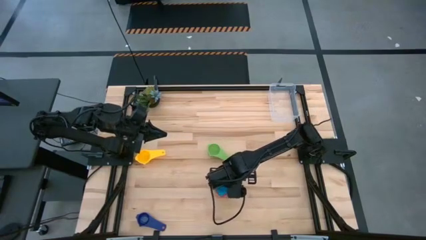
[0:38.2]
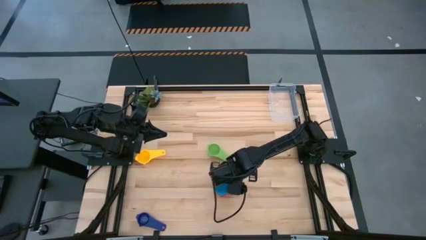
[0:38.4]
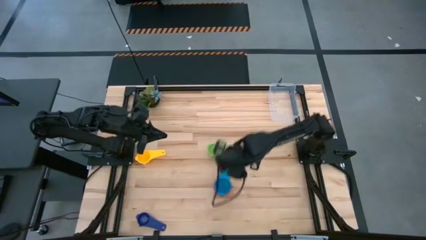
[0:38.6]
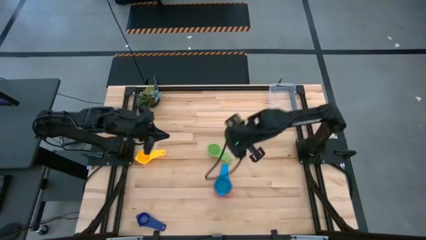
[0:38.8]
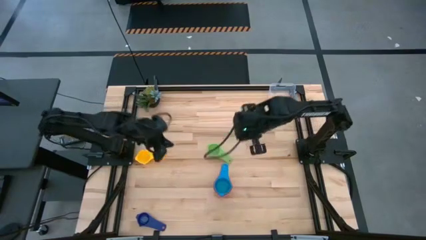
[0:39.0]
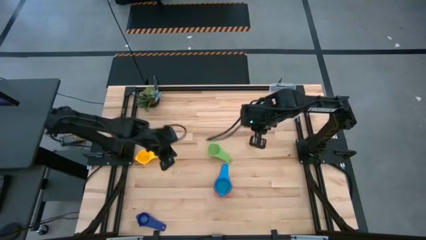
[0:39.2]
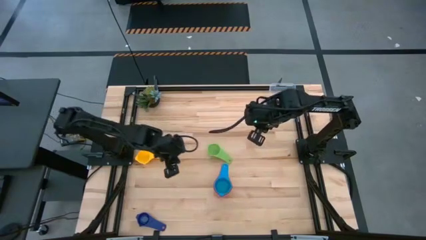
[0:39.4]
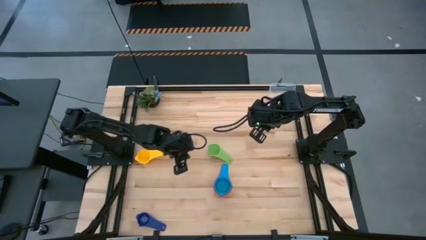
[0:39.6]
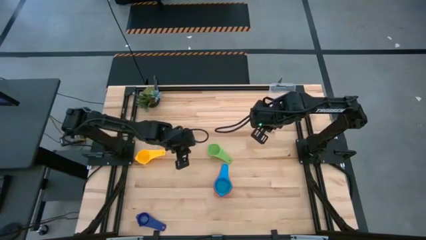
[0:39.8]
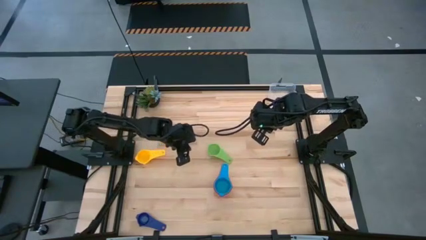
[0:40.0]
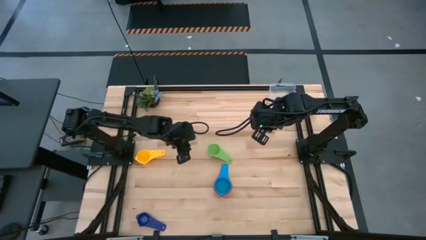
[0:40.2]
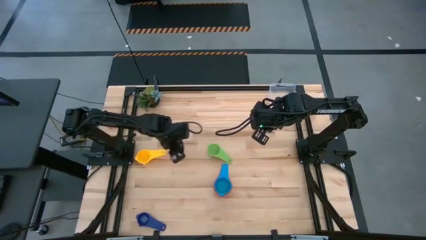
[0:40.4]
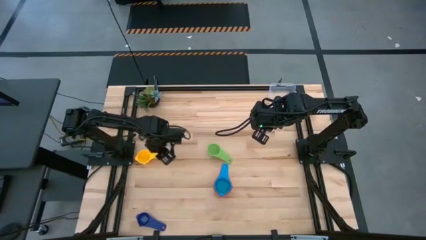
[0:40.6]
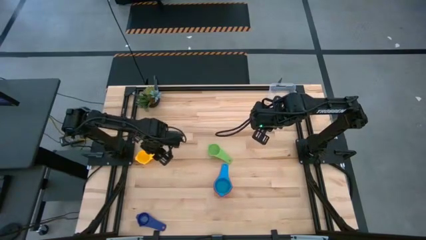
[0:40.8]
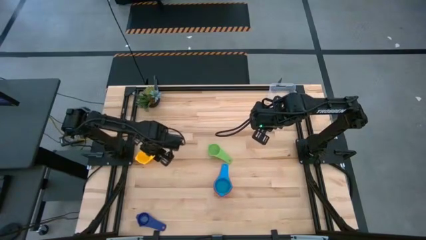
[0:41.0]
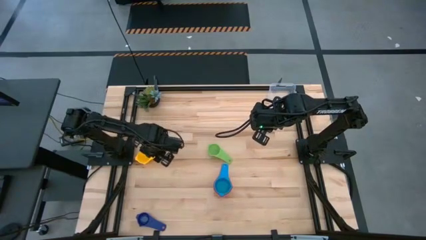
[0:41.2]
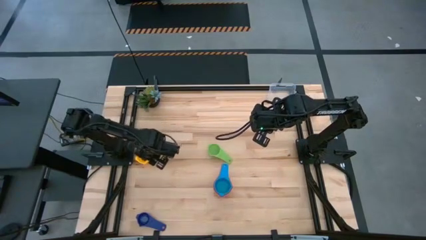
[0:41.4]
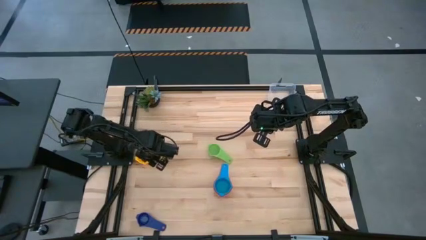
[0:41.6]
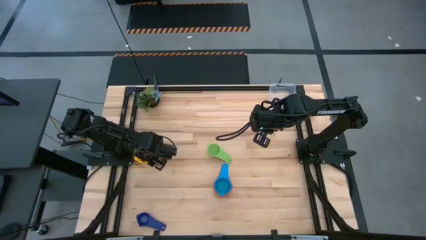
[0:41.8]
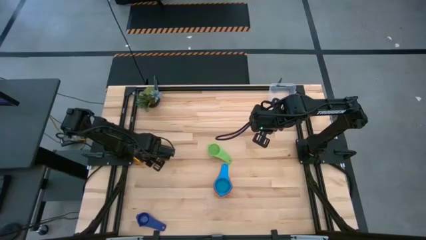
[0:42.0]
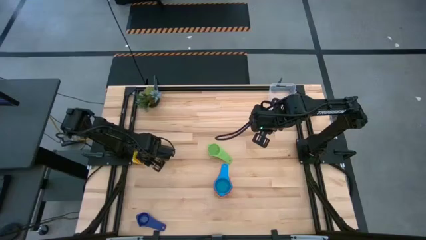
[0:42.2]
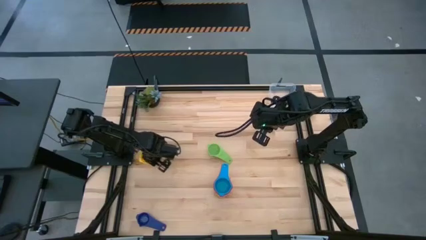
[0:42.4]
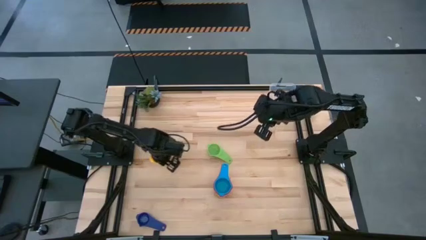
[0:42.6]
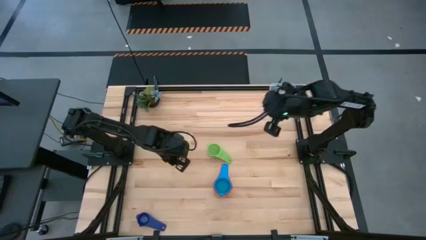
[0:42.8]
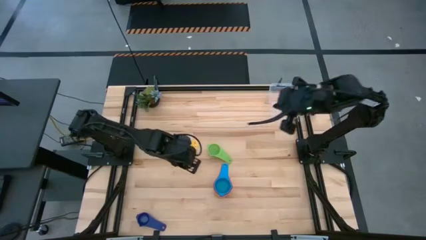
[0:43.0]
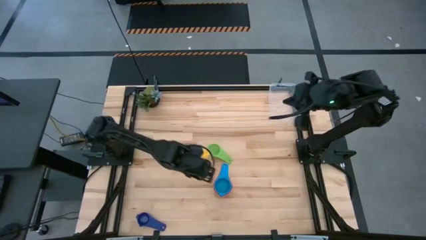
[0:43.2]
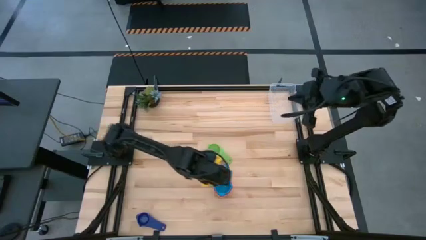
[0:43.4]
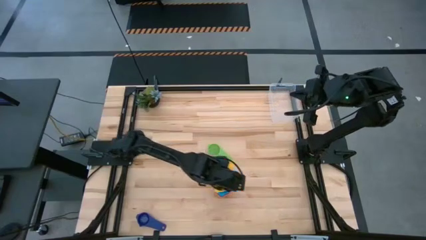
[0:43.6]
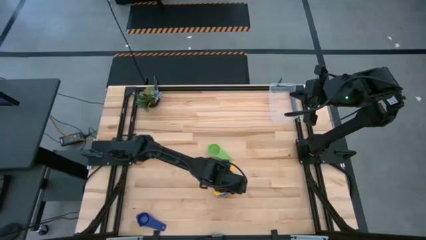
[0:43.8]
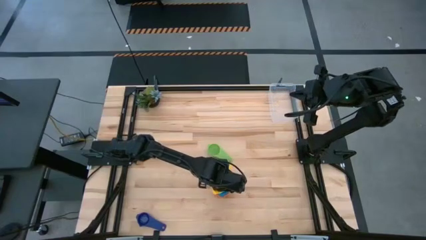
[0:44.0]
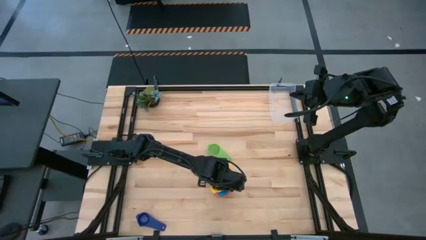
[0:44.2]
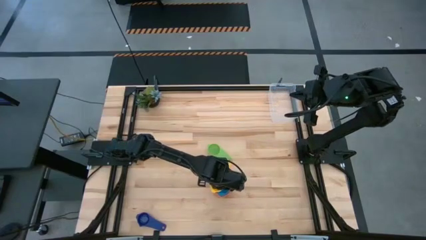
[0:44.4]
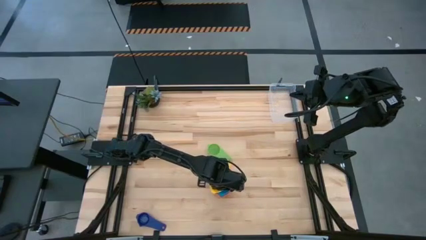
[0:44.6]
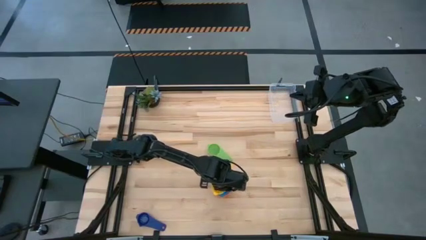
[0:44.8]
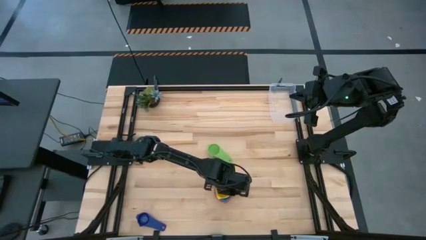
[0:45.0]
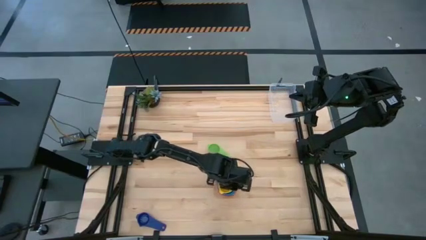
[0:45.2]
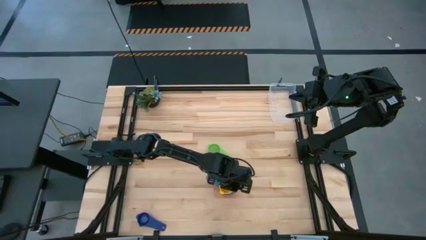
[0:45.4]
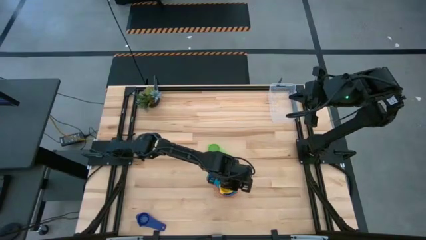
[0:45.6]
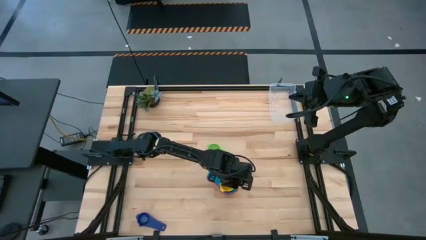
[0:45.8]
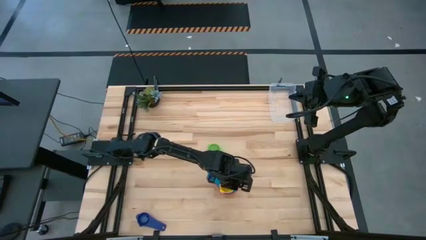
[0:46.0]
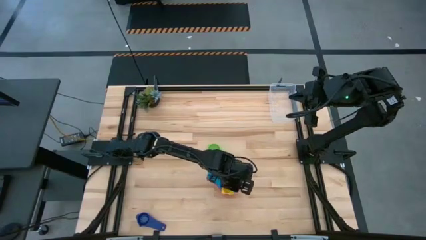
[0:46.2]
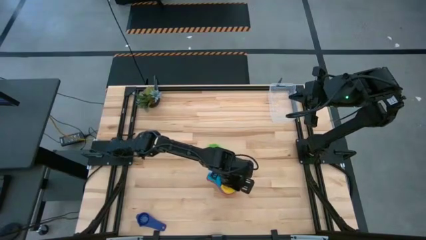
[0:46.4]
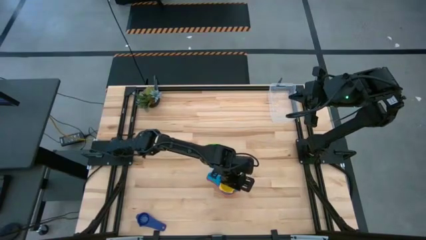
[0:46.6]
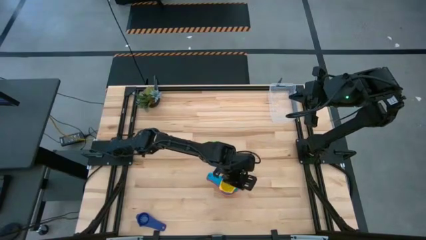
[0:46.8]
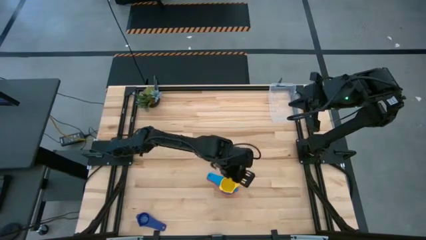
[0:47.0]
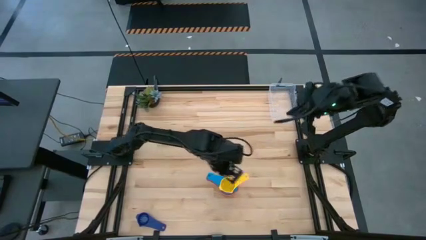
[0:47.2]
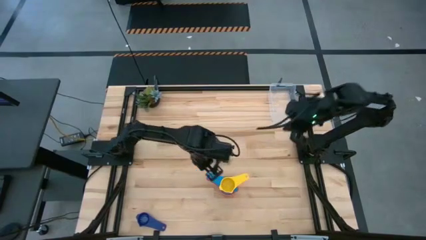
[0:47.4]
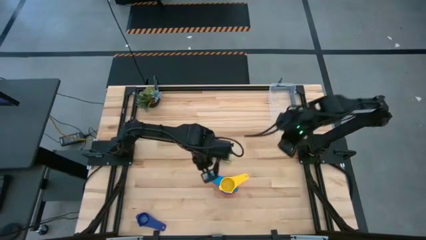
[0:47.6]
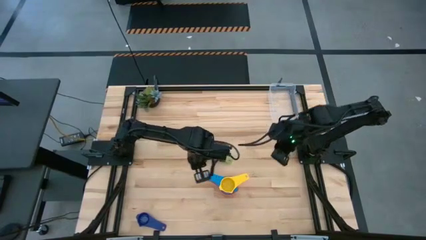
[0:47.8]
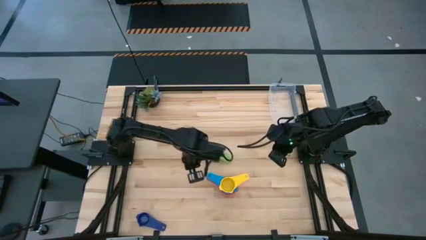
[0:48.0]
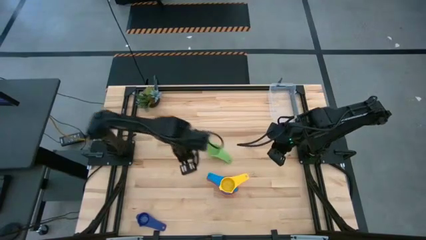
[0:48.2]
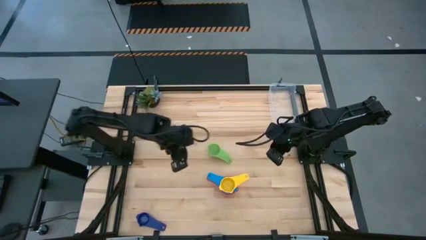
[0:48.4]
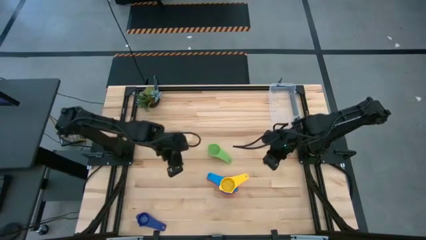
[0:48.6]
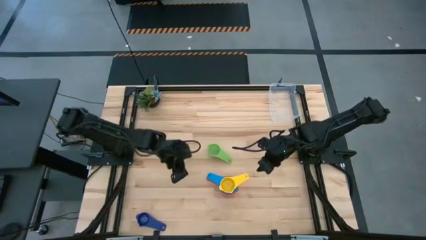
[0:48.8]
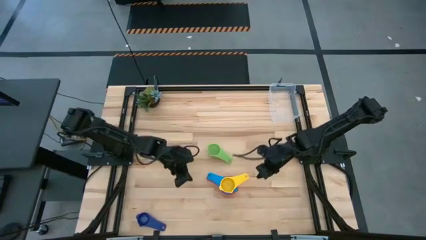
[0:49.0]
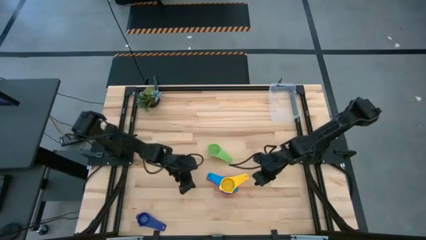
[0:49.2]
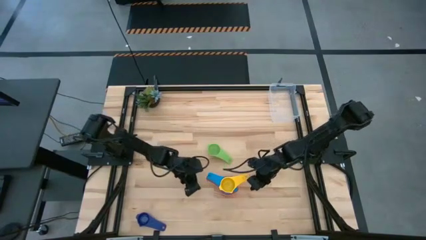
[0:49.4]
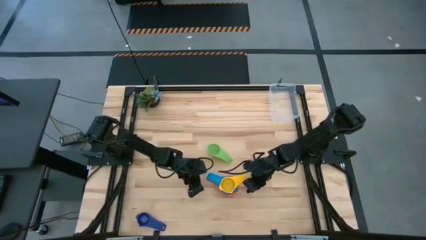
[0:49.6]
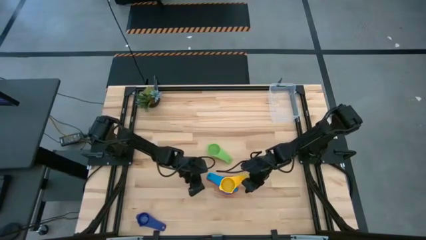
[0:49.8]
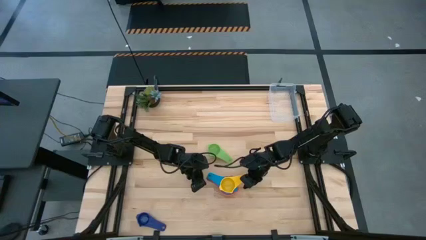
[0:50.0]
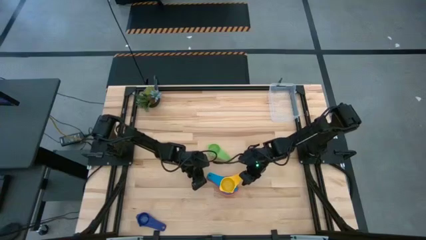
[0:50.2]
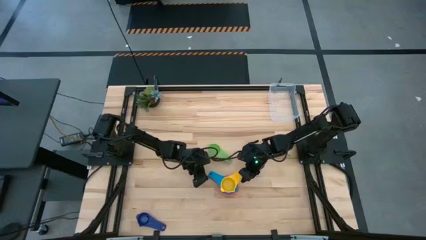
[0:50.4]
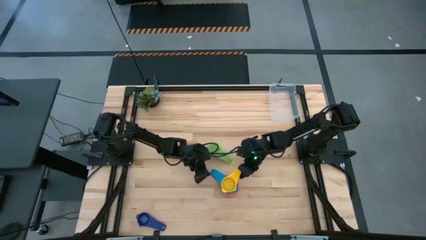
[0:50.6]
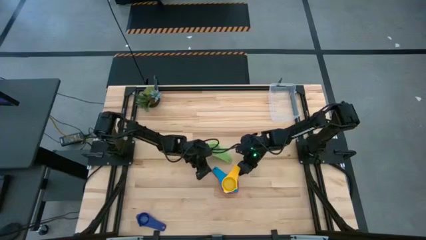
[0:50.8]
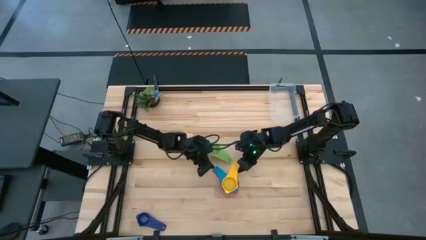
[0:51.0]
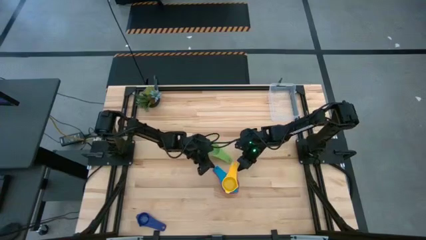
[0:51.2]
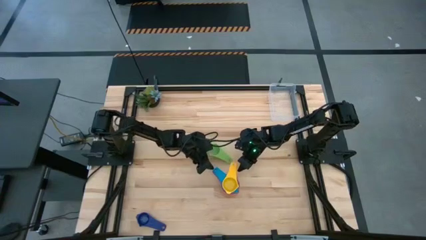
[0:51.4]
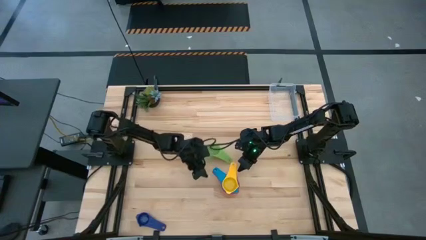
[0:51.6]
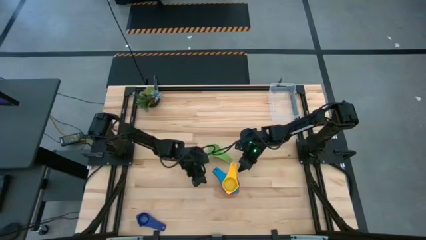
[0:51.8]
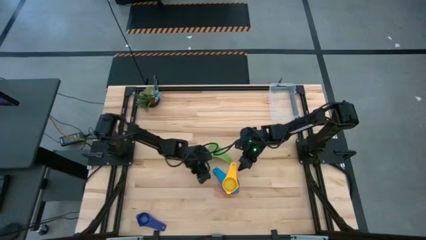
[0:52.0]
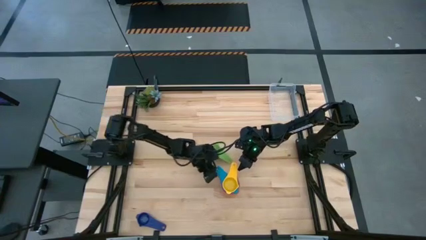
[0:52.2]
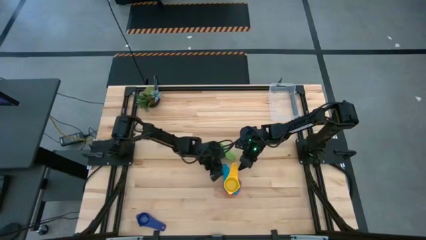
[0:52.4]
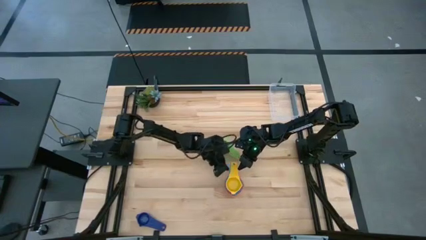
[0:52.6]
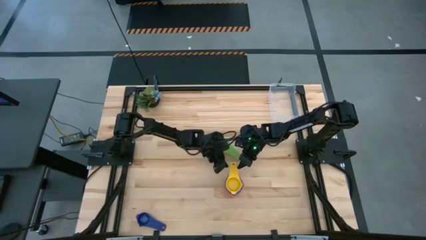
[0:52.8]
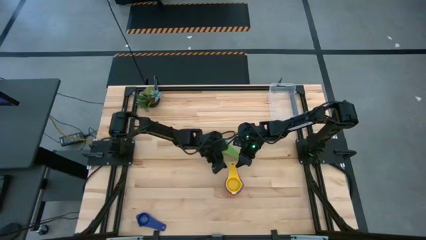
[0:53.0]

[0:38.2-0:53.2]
Task: Nest measuring cups in basket
Stack the yellow measuring cup on top of the light blue measuring cup

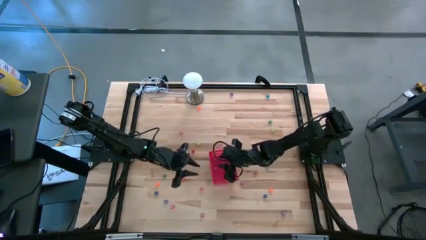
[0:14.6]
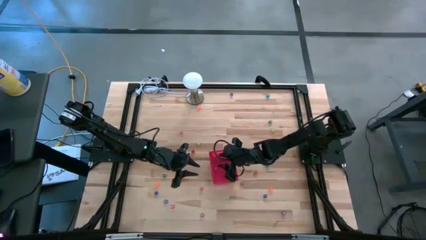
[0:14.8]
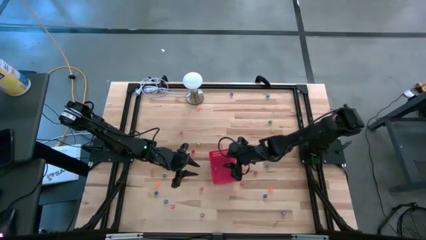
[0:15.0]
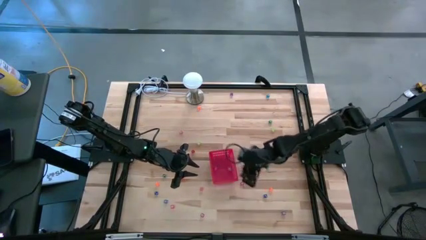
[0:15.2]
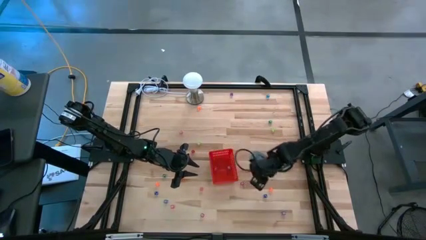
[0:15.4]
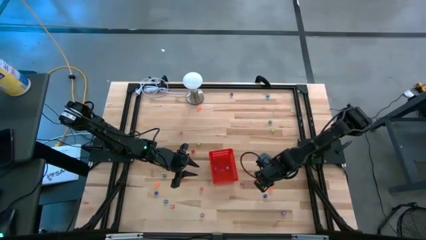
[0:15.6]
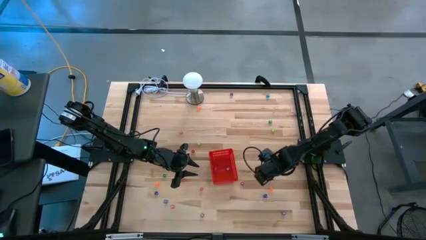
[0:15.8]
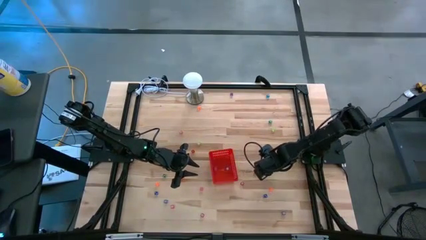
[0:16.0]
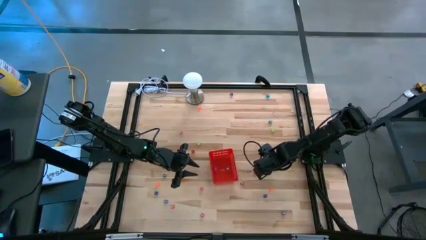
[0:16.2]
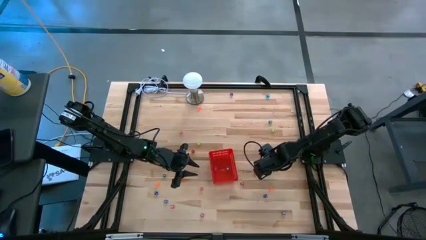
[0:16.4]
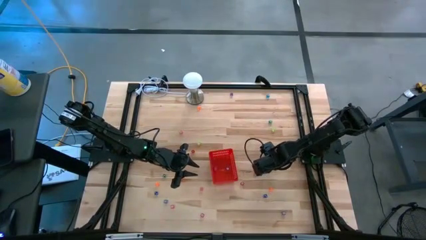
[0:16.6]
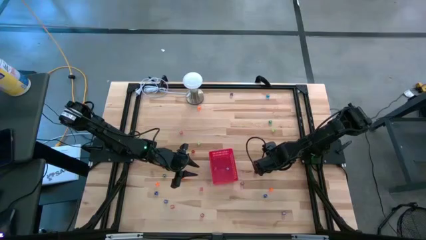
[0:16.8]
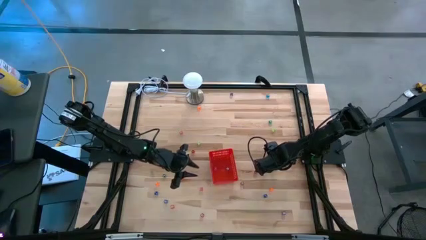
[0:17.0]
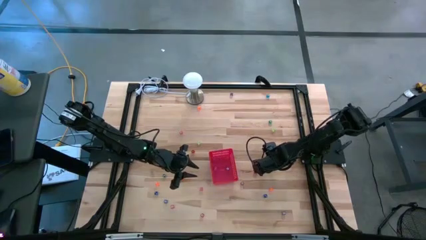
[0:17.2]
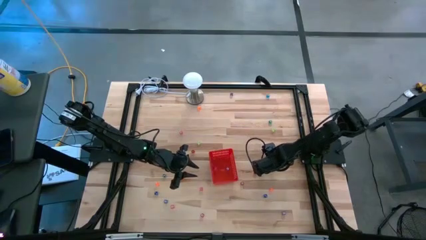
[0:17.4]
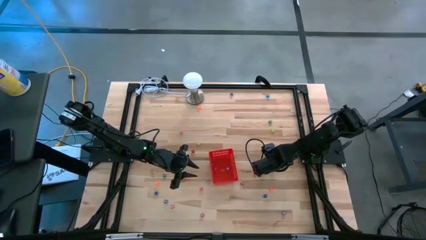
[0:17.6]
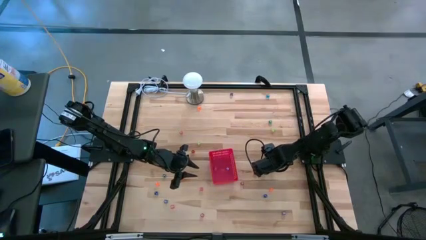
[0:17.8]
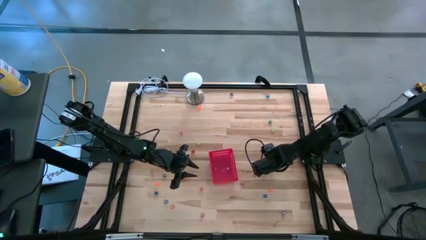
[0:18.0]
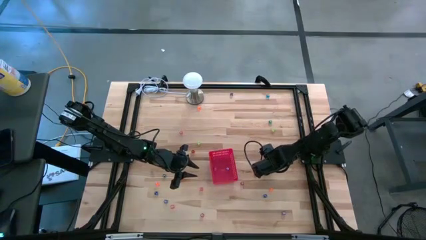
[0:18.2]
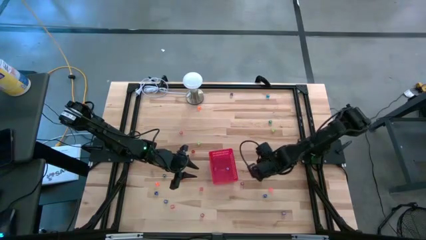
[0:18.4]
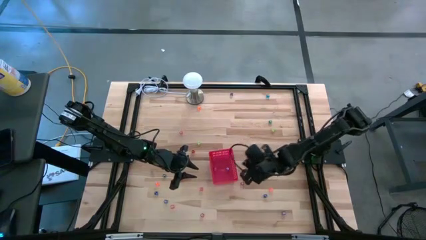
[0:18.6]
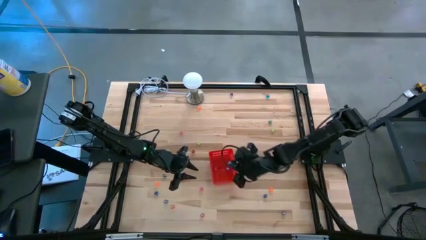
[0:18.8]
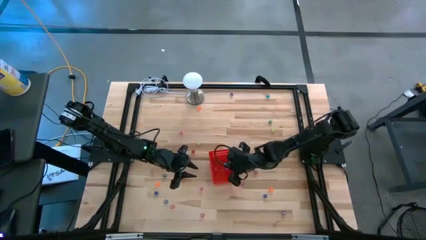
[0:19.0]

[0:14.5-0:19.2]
Task: Pick & Place Dice
Put the light blue die into the red basket
